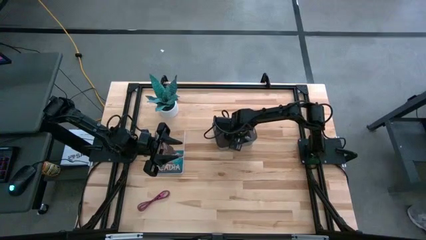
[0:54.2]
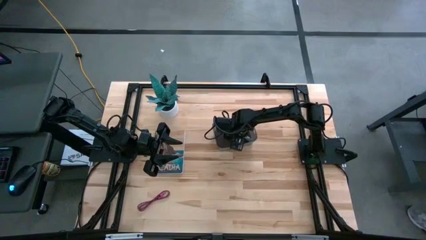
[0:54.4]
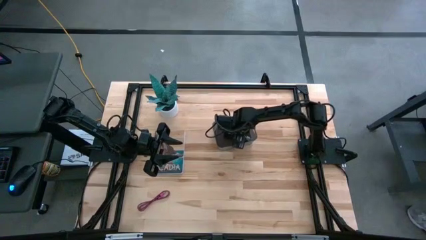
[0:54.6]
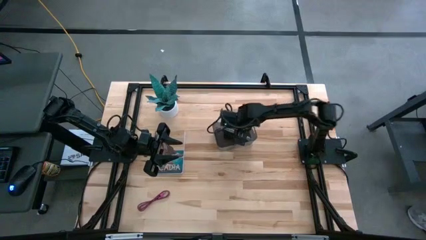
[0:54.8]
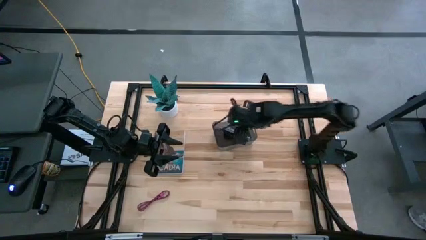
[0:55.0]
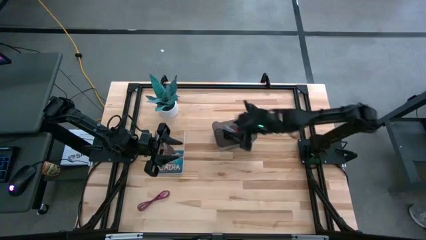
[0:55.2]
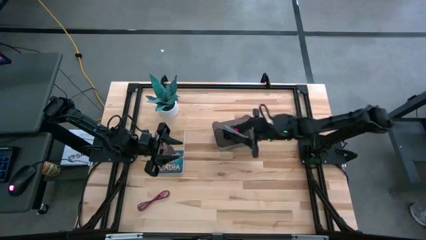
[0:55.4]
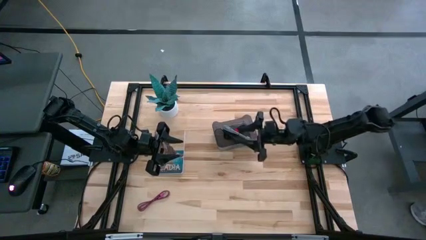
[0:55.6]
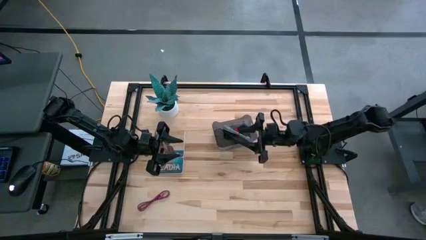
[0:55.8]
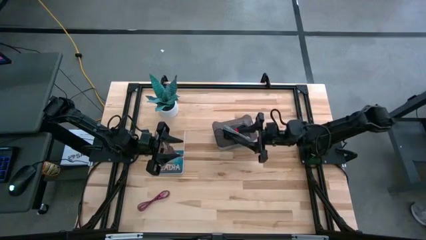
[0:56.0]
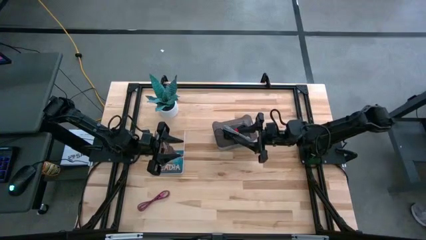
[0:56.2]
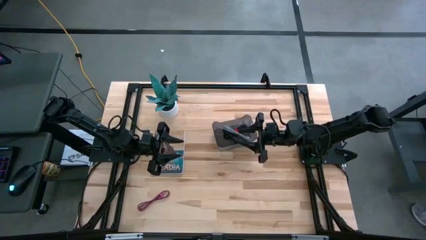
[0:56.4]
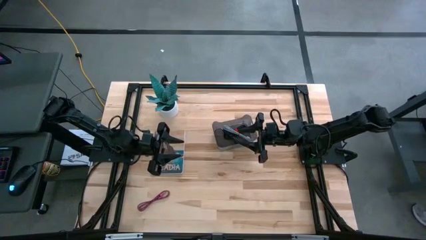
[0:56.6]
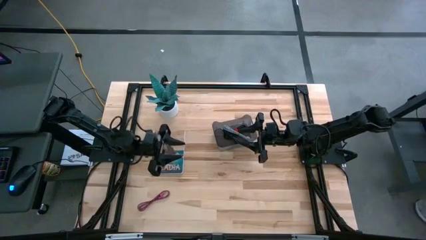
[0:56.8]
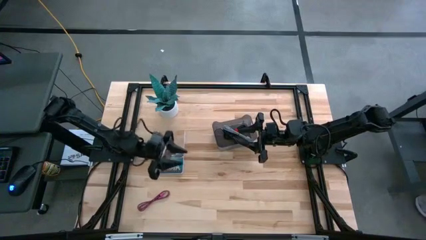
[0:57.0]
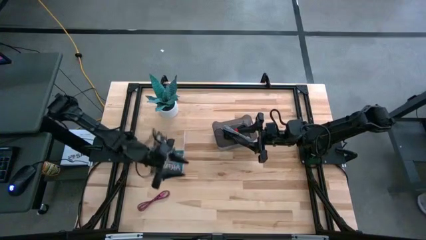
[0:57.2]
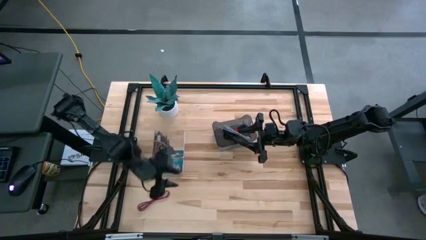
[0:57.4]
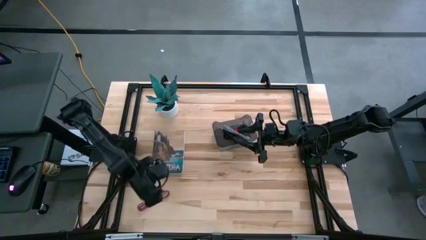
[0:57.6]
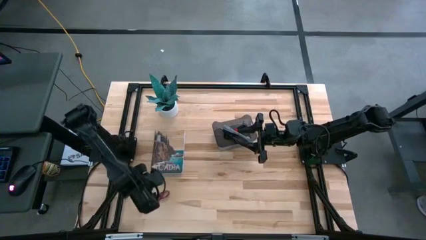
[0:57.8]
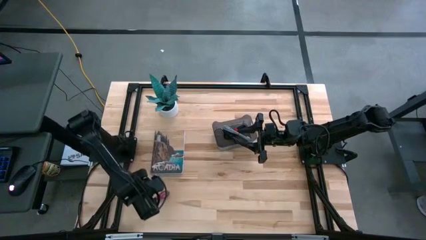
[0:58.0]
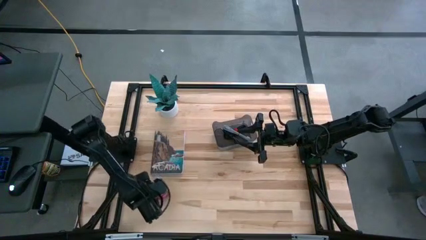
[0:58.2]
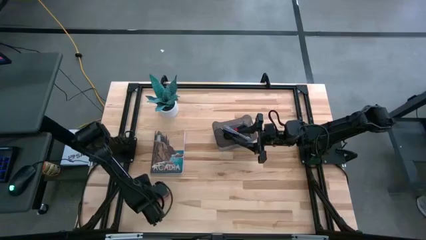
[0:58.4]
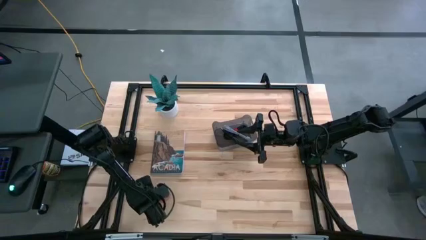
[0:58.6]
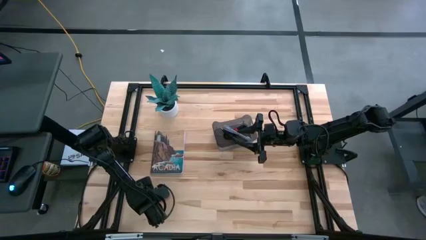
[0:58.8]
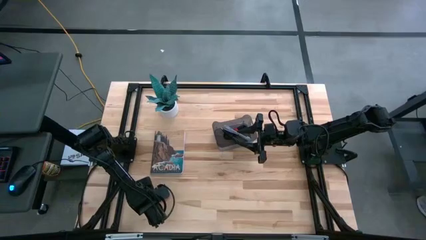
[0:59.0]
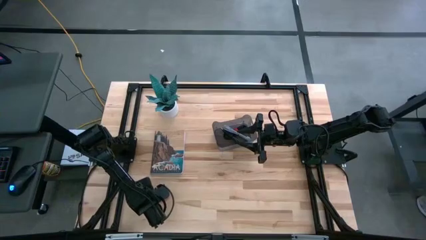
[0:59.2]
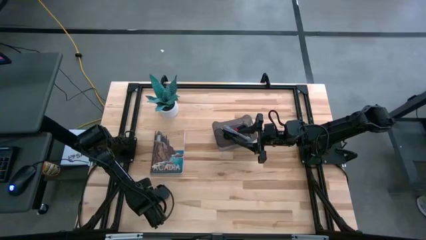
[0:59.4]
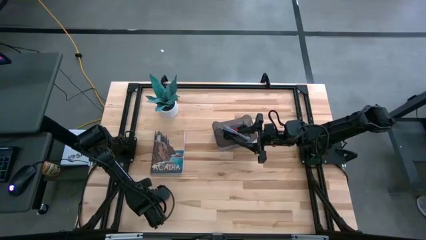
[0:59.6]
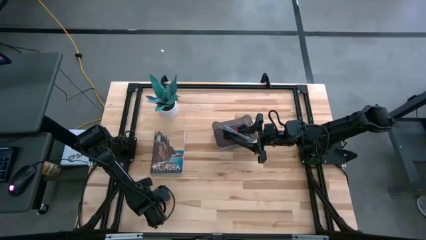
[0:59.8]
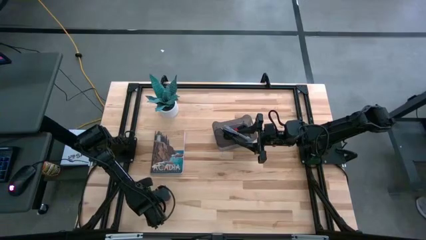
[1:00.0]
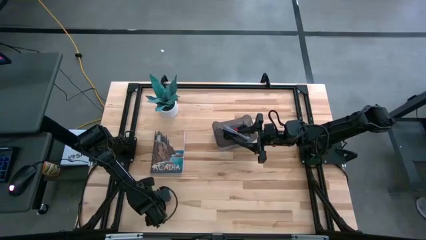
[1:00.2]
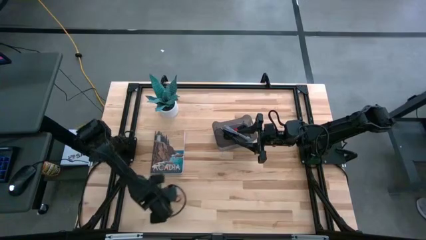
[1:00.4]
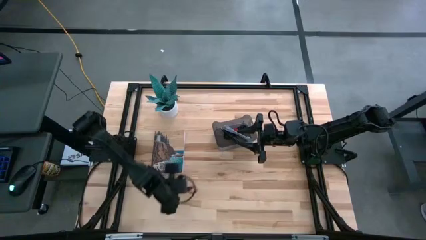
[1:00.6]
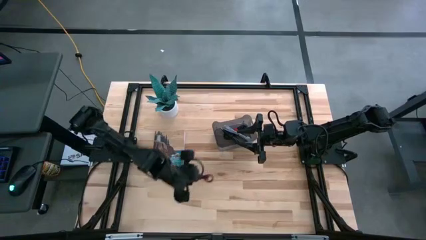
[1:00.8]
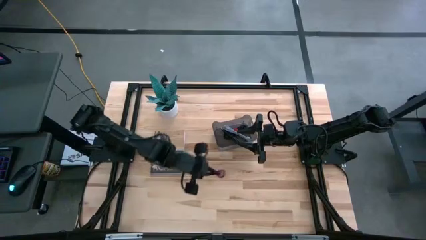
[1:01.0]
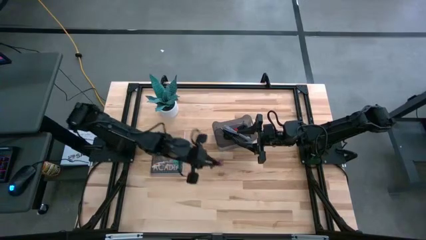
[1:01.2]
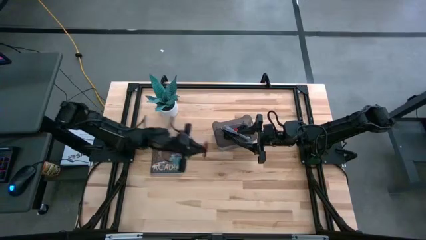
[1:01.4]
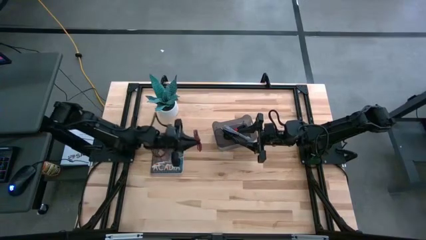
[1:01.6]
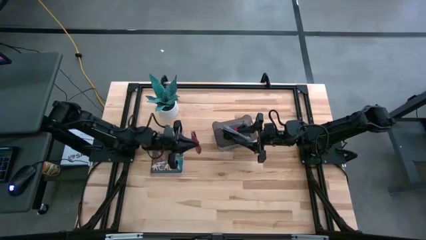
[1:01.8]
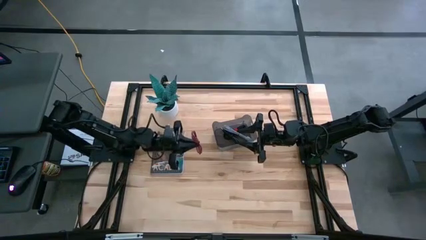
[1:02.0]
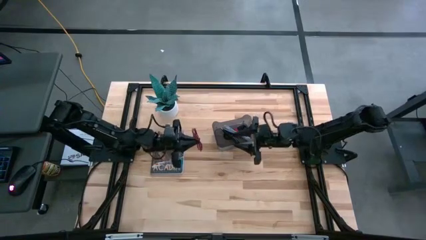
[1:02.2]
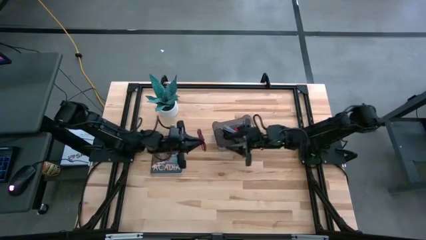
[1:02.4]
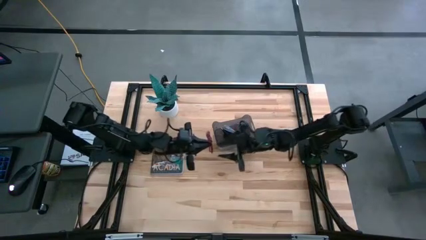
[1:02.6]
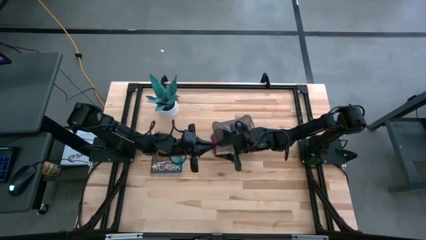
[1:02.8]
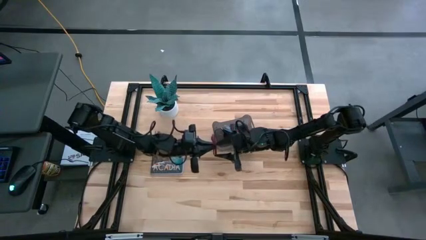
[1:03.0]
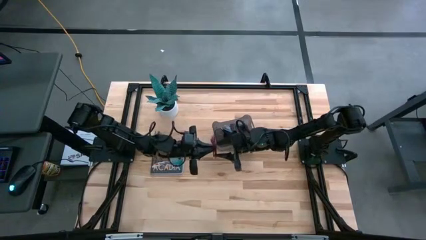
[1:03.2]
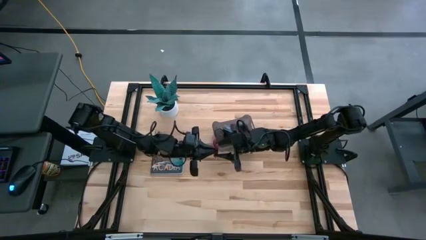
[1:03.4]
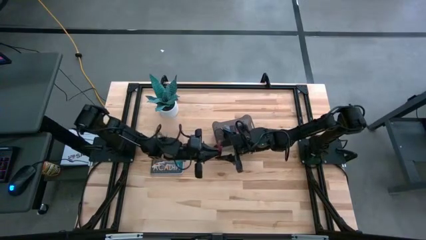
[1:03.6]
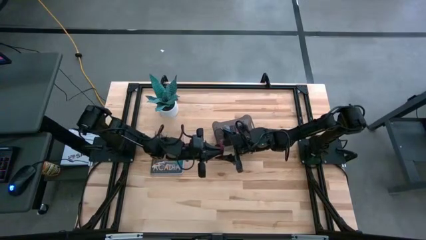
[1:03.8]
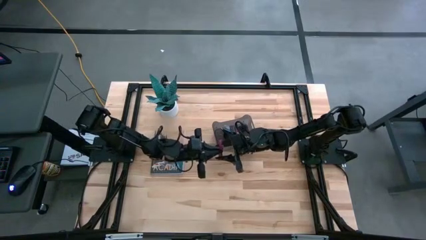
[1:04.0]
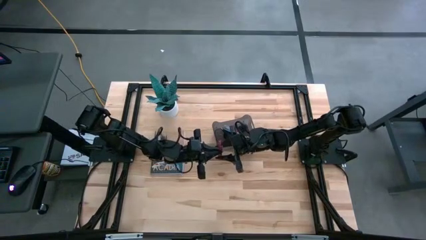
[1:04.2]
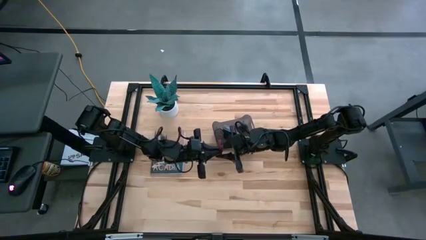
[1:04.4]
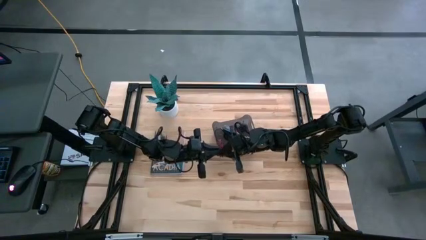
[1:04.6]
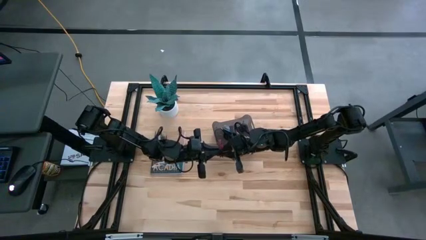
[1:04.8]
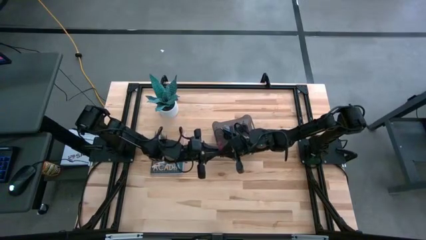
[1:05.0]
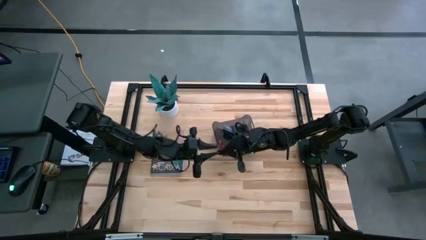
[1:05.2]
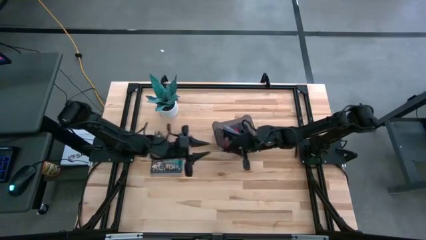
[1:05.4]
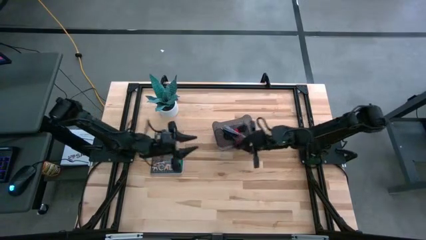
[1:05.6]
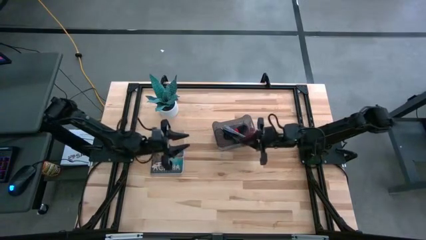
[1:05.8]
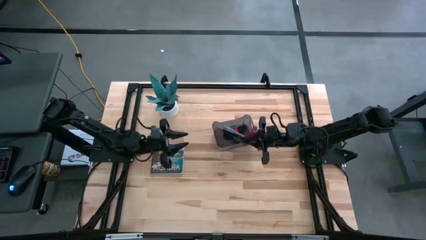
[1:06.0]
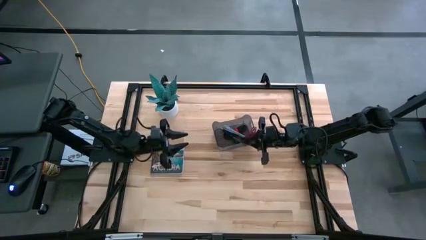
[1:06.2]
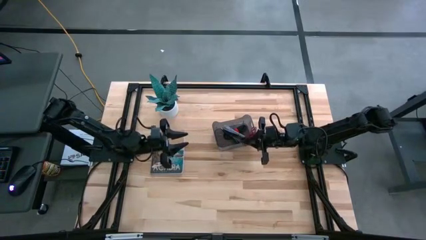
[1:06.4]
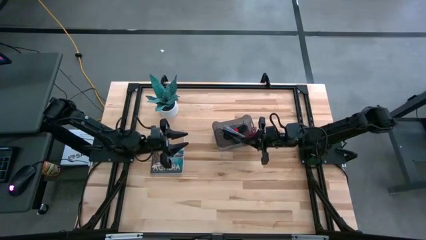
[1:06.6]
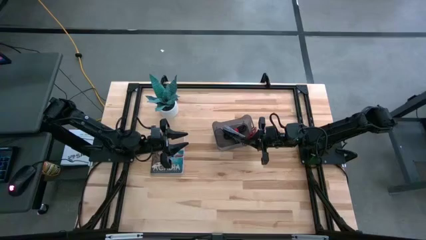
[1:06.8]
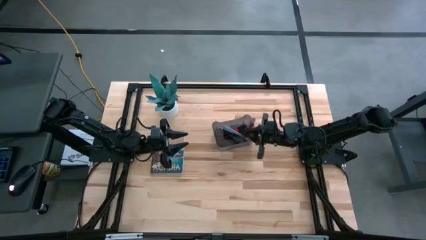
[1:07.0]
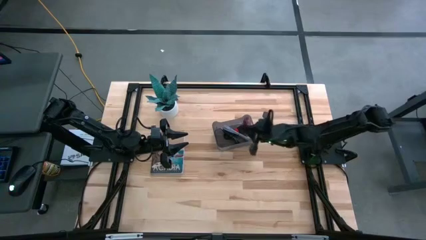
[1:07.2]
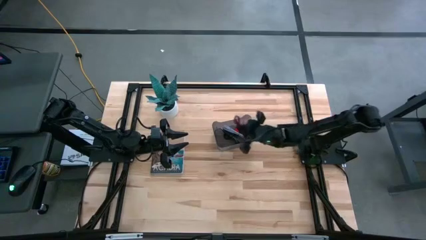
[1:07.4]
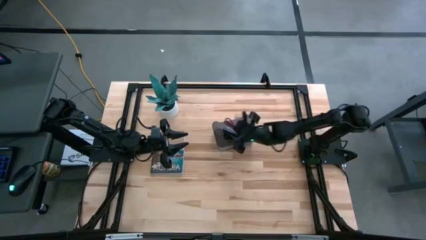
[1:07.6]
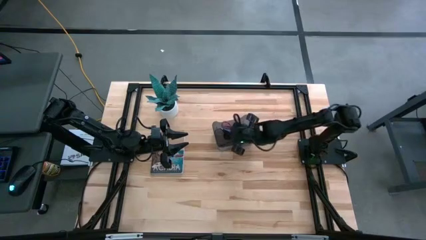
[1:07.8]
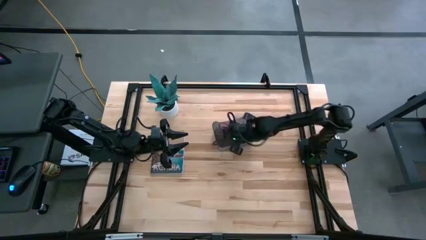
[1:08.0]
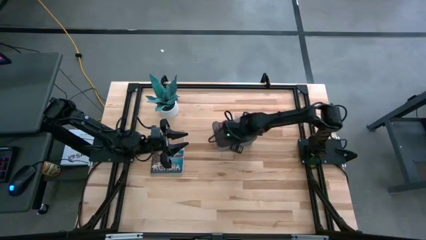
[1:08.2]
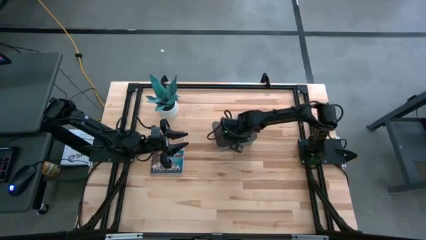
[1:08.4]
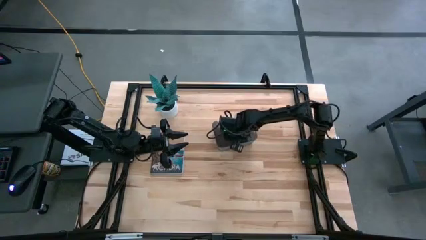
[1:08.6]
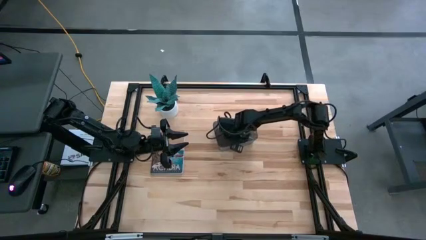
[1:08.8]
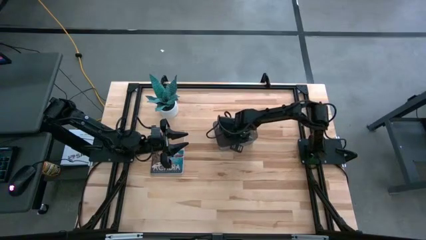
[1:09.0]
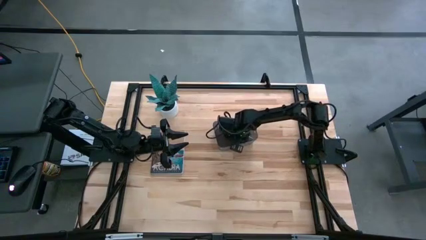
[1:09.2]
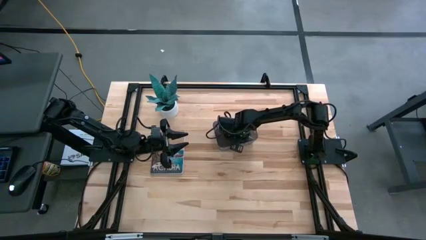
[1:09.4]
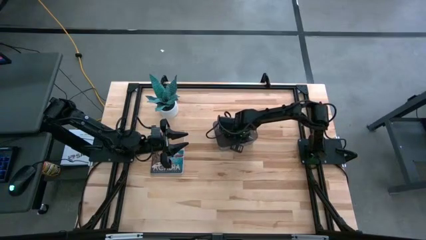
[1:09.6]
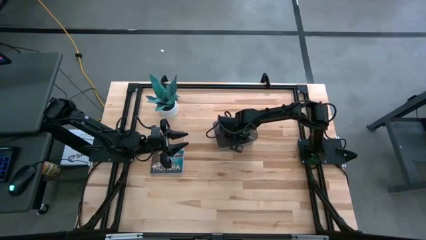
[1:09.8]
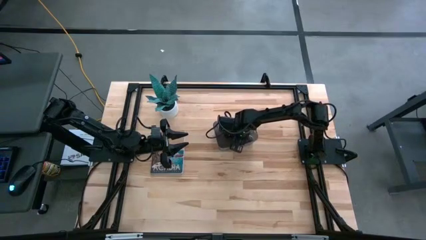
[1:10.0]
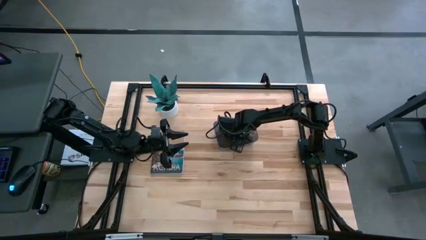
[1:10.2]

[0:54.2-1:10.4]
Task: Pick and place USB-C Cables
Put the pink USB cable into the black bin
